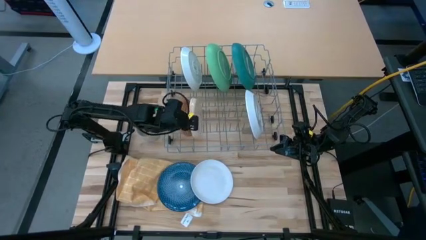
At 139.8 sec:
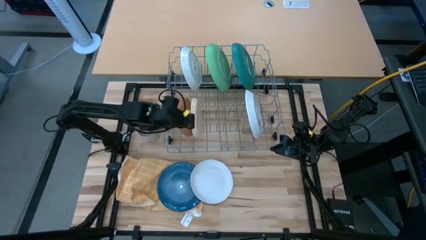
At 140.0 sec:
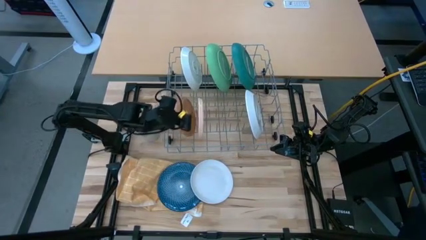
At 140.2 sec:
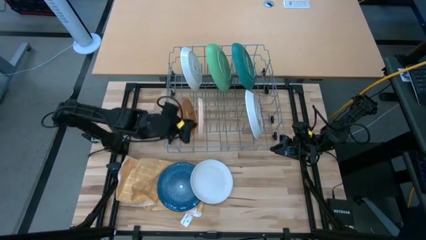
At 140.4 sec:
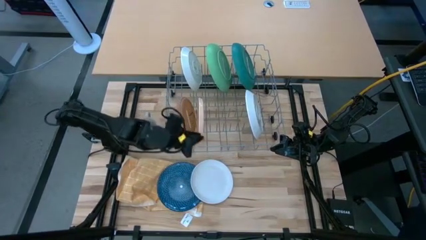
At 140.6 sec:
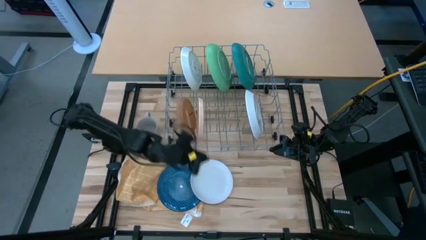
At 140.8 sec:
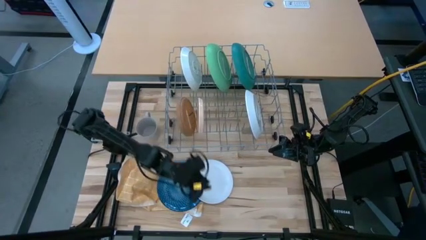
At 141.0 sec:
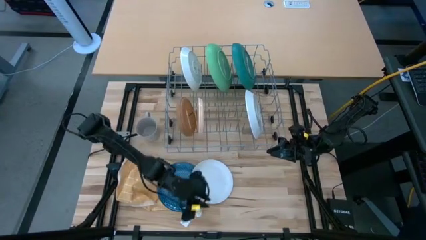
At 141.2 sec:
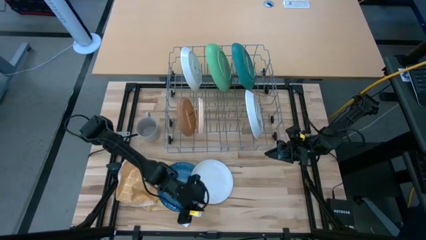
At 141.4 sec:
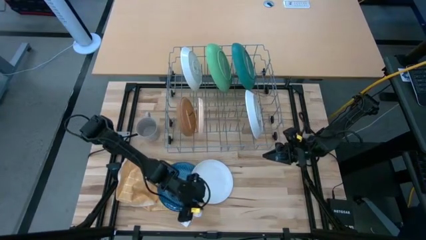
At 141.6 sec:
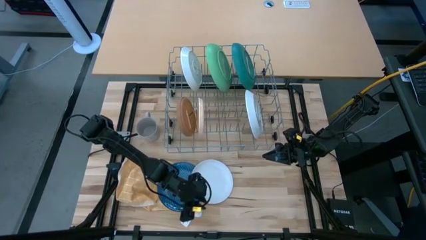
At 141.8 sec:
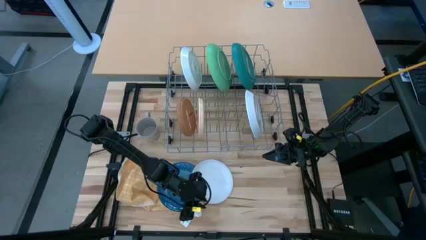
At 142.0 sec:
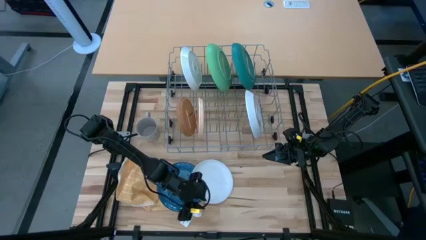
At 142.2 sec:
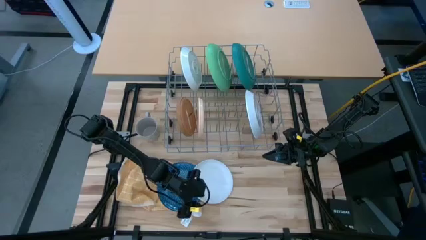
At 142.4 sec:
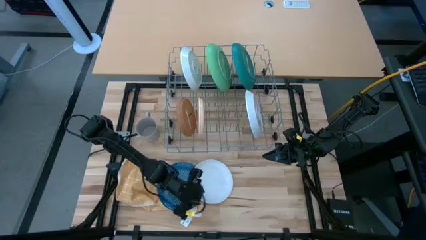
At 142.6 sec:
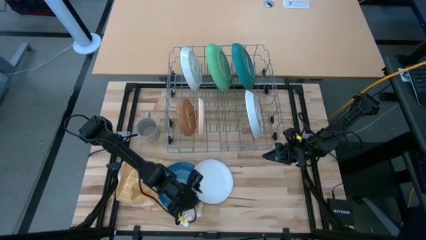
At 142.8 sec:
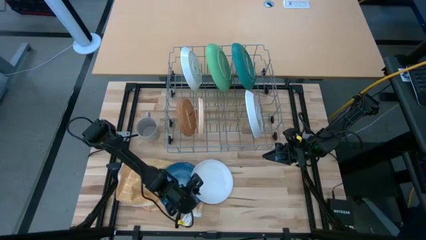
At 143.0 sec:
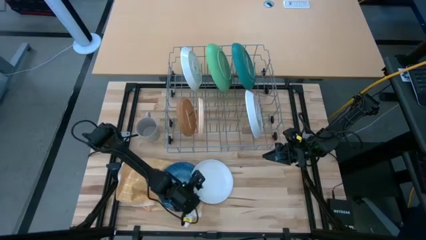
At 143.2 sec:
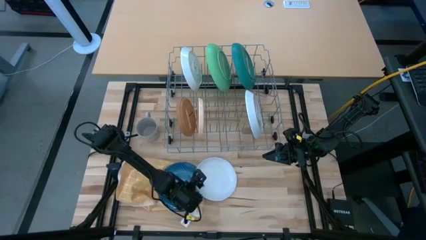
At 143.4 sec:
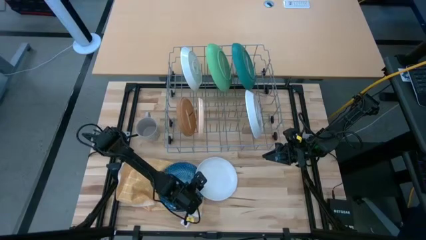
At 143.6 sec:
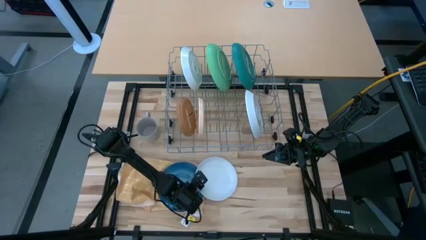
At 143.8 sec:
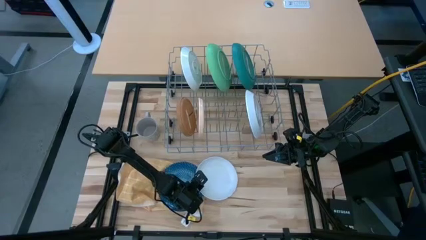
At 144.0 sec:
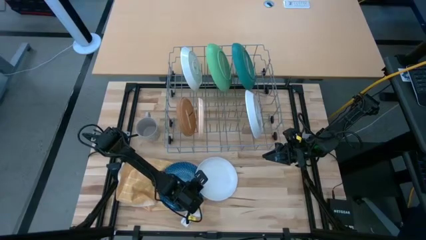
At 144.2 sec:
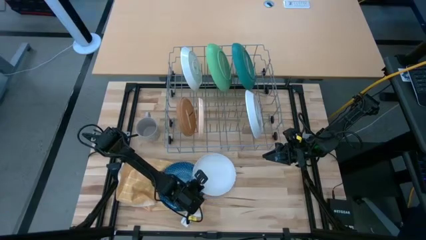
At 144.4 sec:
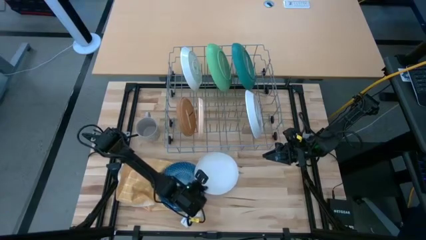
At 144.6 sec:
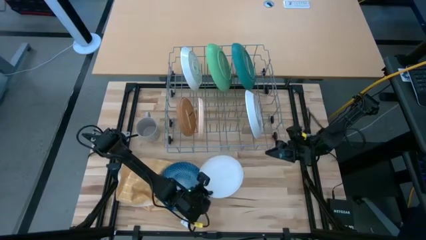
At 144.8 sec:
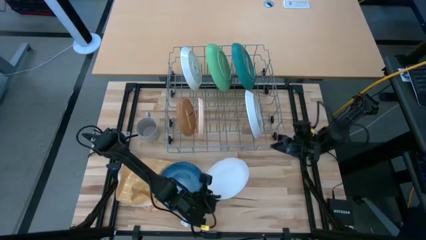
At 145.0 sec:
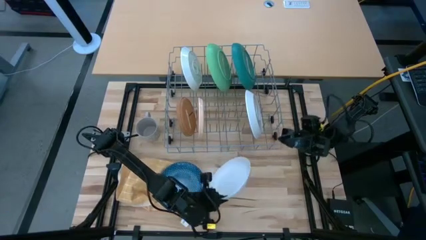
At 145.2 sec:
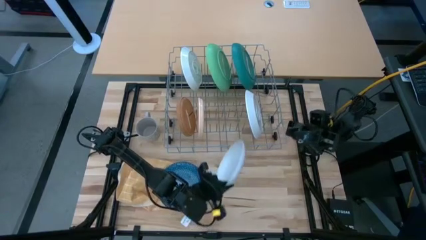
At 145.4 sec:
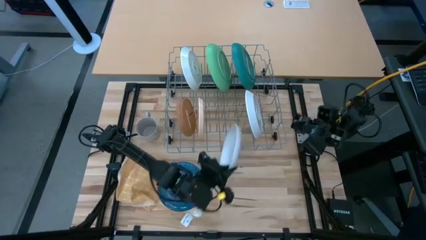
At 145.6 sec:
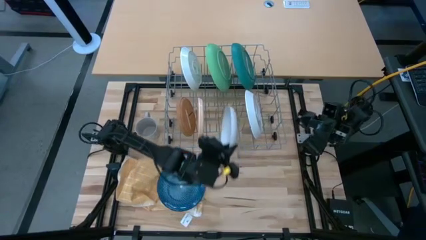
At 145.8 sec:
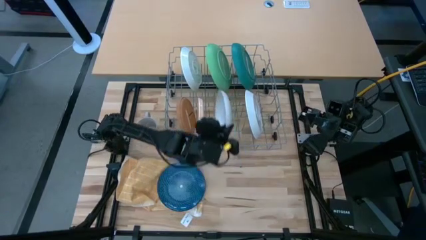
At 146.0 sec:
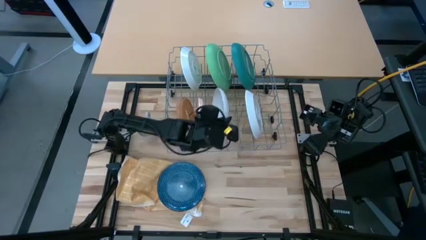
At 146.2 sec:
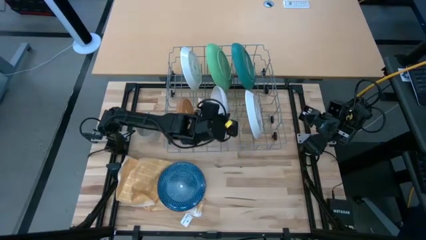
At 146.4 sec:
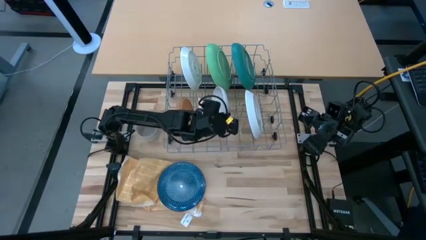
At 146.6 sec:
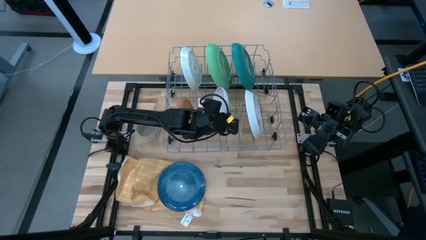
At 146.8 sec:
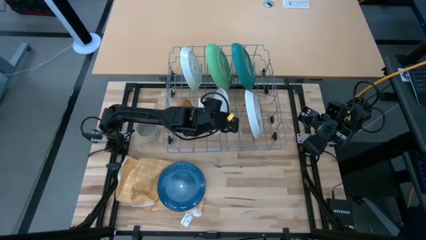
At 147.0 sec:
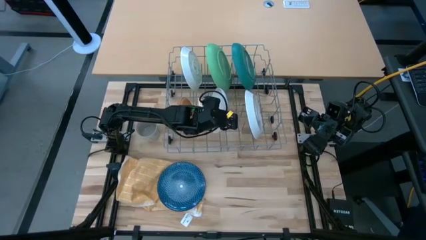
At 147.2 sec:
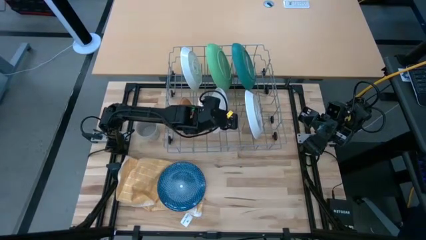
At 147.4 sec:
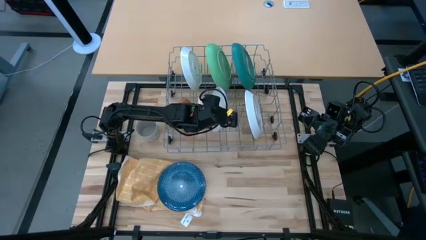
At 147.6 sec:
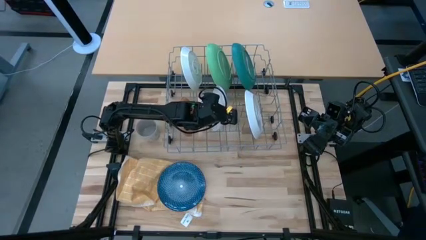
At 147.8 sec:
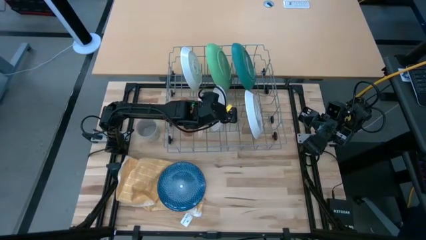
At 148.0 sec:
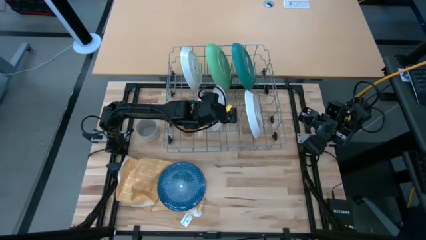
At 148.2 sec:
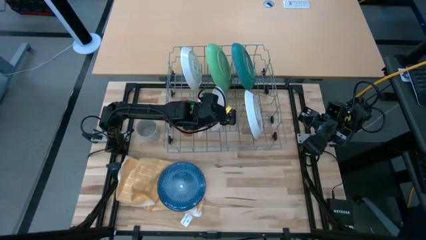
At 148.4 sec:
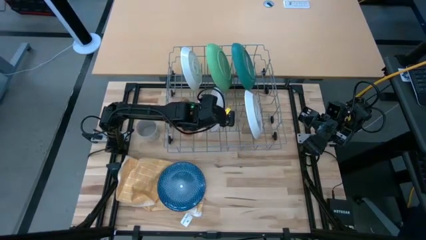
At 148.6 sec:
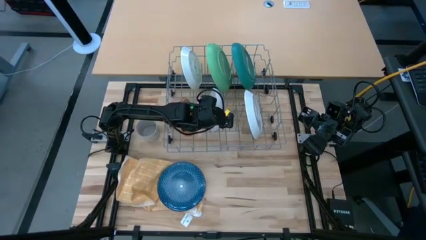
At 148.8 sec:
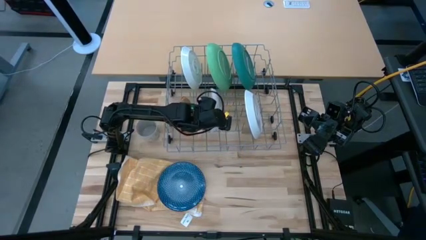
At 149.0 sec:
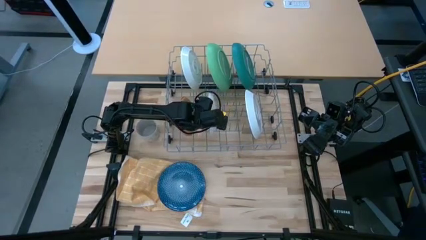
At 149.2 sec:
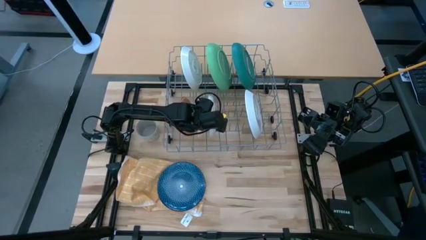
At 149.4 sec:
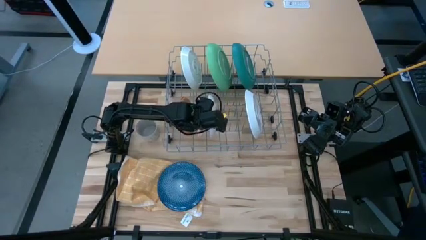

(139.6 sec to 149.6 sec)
Task: Sort dishes
Put the white plate in the dish rack
